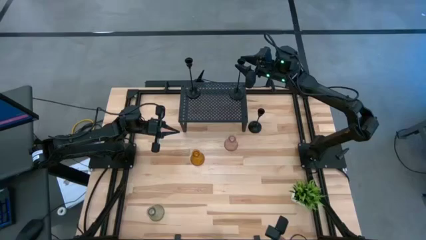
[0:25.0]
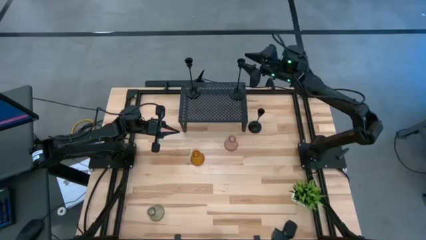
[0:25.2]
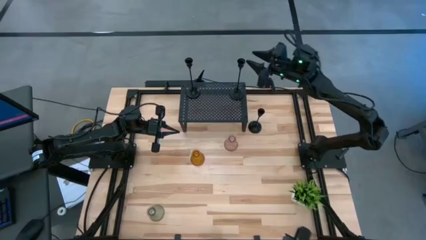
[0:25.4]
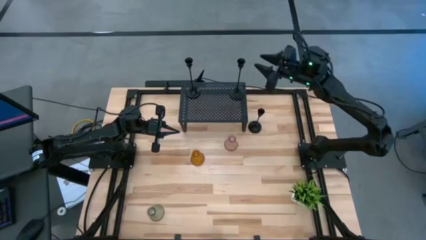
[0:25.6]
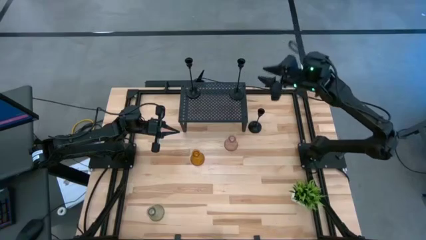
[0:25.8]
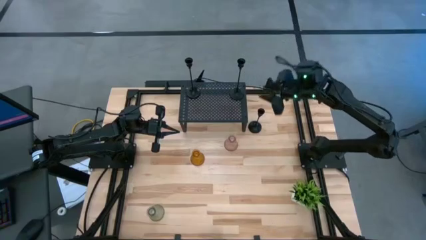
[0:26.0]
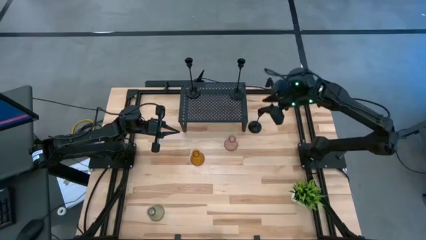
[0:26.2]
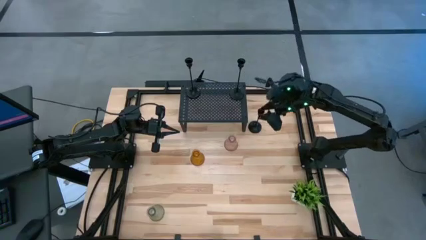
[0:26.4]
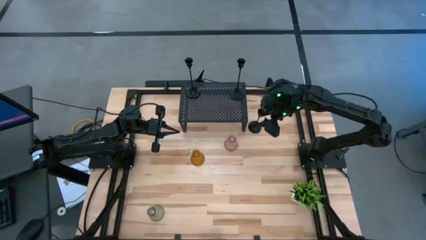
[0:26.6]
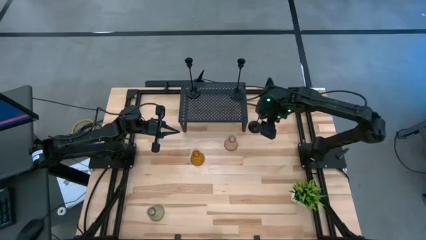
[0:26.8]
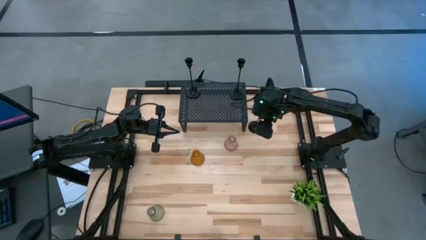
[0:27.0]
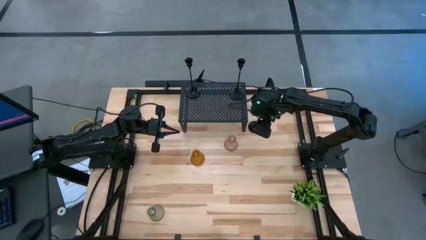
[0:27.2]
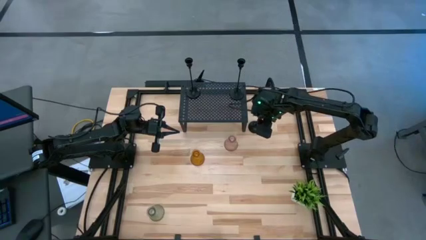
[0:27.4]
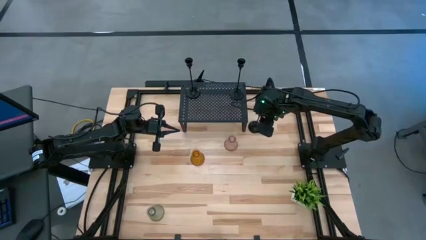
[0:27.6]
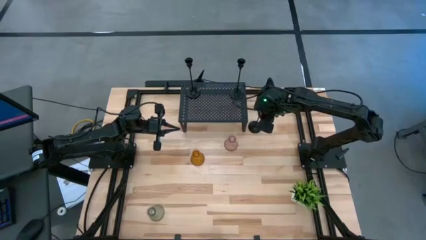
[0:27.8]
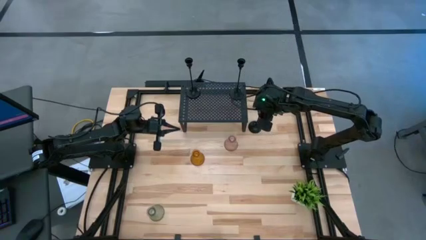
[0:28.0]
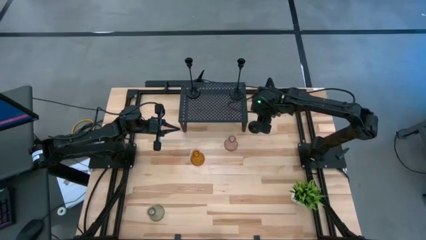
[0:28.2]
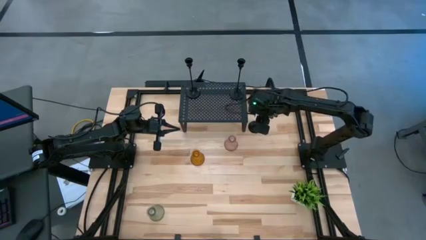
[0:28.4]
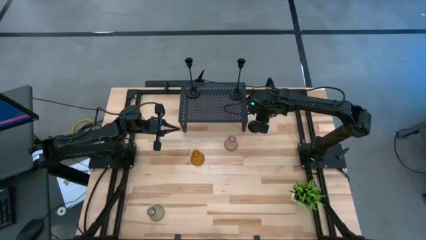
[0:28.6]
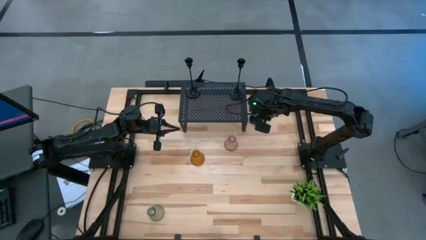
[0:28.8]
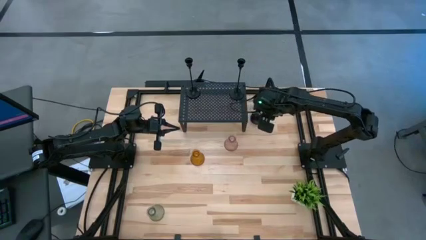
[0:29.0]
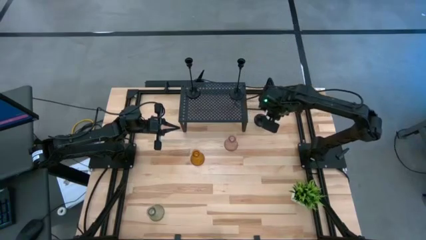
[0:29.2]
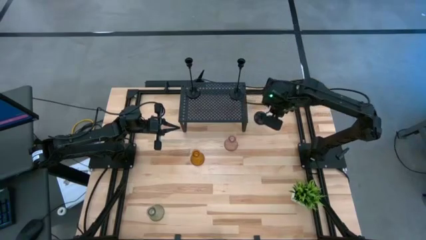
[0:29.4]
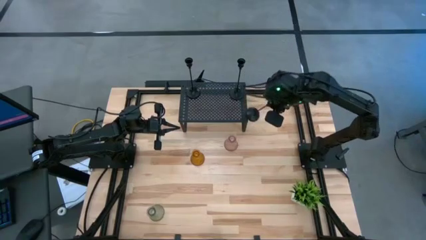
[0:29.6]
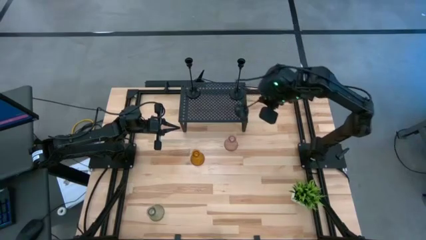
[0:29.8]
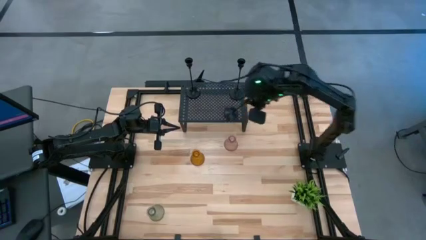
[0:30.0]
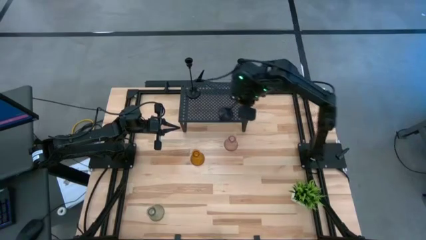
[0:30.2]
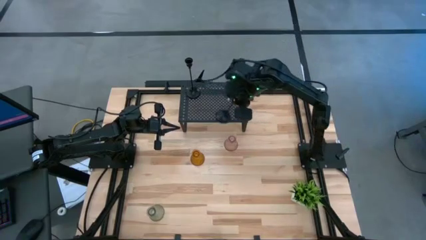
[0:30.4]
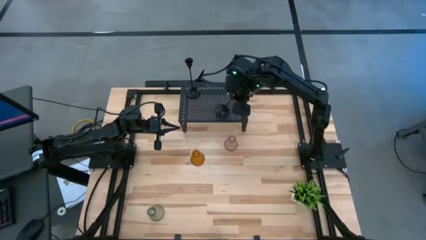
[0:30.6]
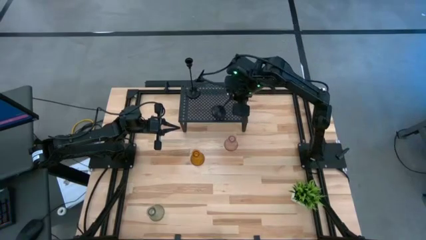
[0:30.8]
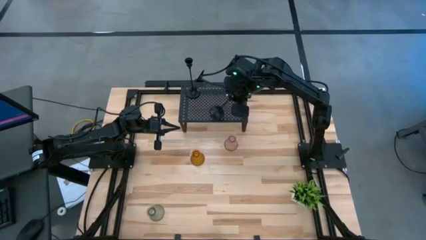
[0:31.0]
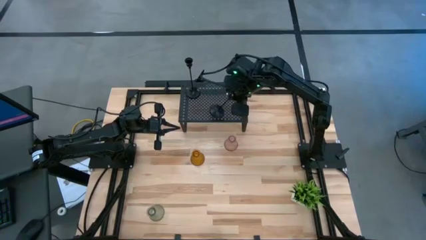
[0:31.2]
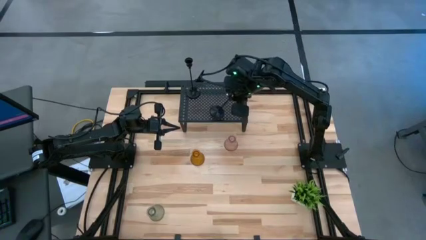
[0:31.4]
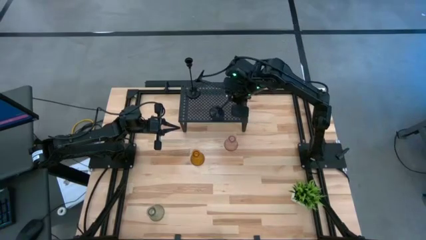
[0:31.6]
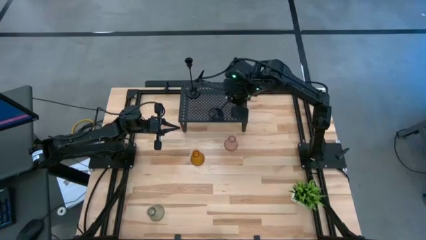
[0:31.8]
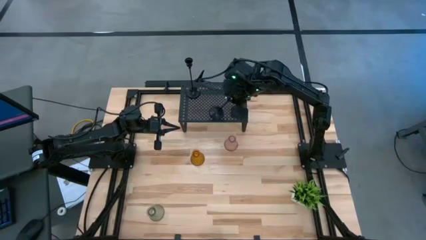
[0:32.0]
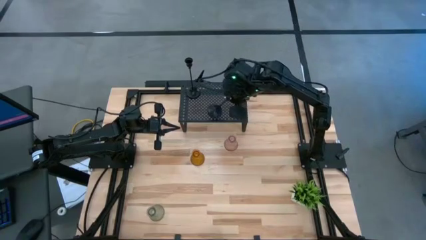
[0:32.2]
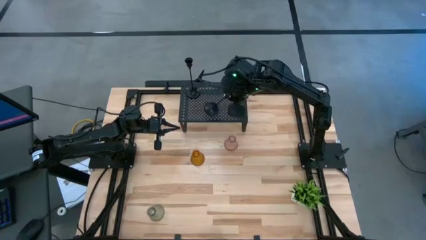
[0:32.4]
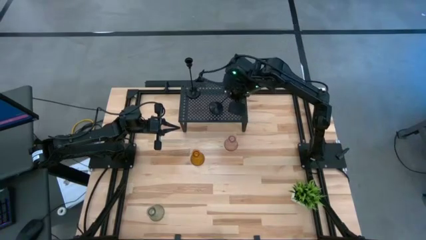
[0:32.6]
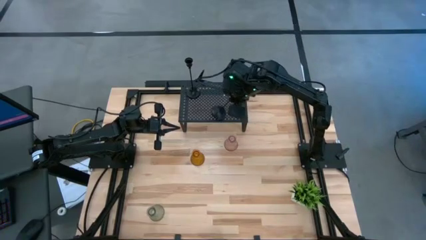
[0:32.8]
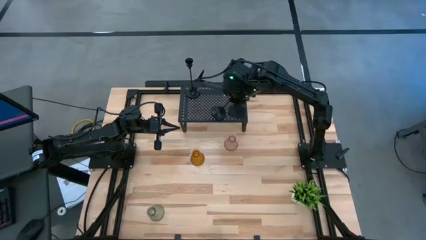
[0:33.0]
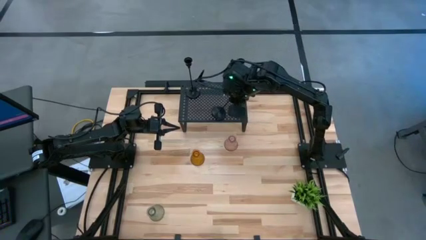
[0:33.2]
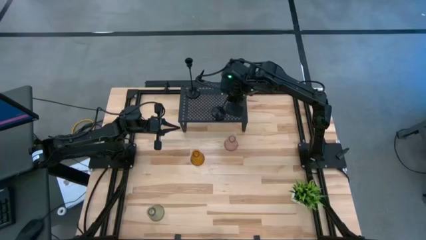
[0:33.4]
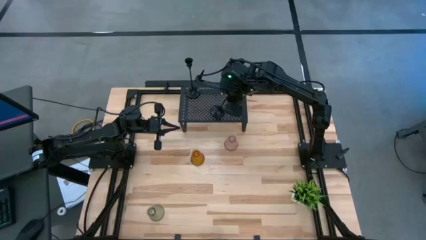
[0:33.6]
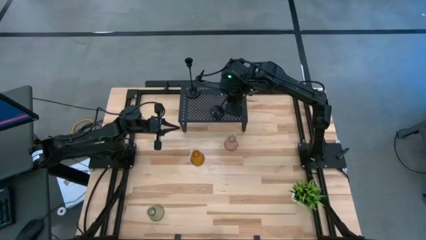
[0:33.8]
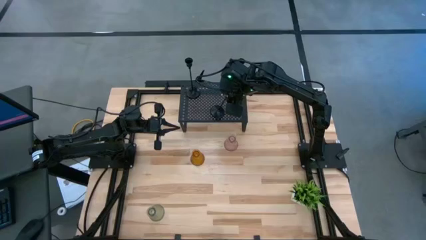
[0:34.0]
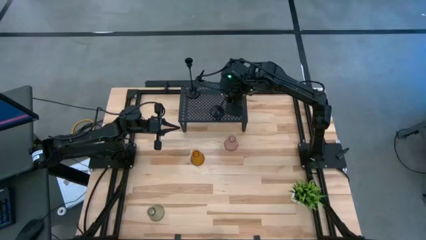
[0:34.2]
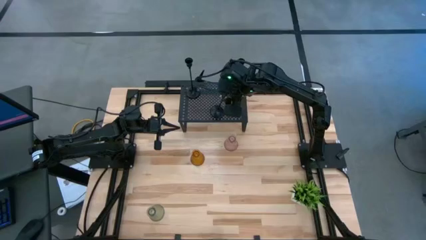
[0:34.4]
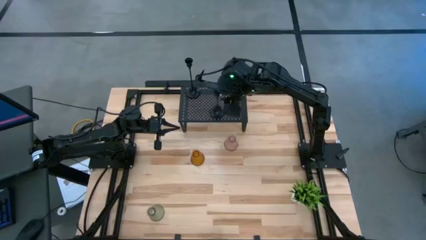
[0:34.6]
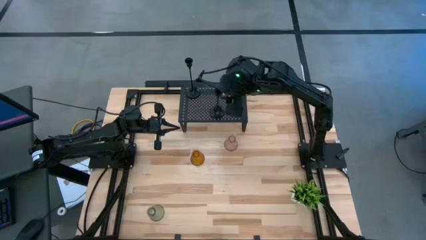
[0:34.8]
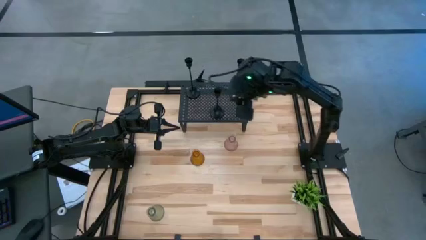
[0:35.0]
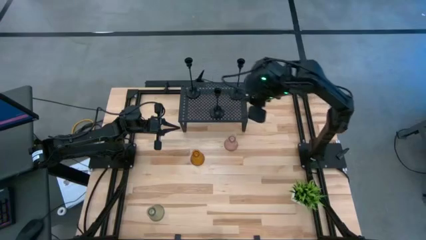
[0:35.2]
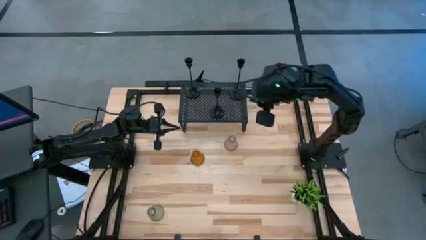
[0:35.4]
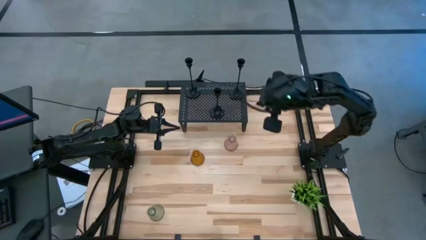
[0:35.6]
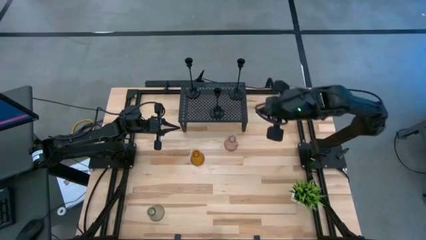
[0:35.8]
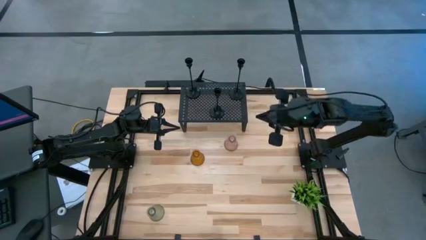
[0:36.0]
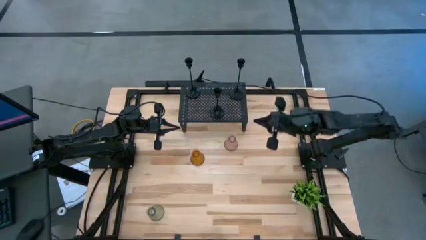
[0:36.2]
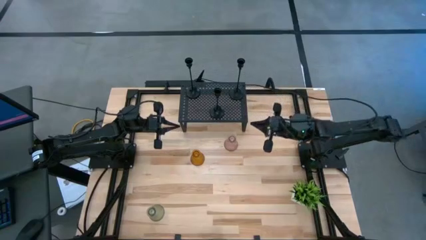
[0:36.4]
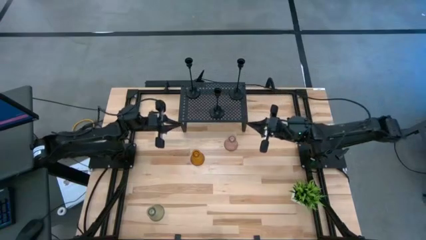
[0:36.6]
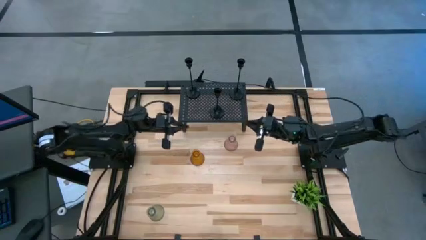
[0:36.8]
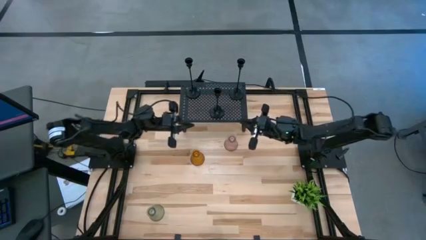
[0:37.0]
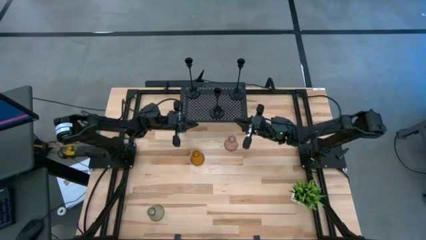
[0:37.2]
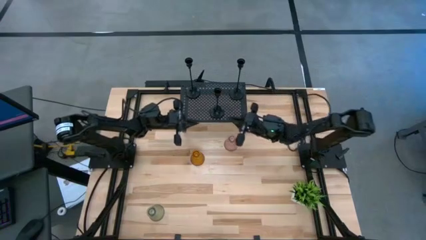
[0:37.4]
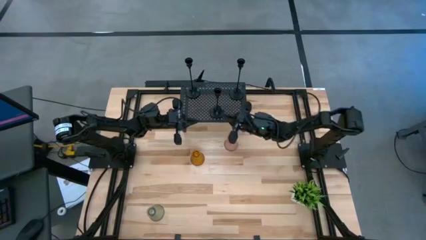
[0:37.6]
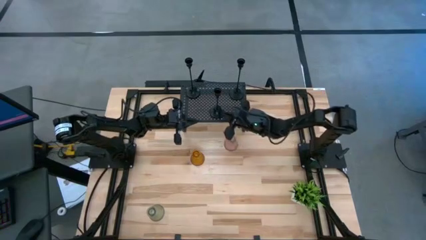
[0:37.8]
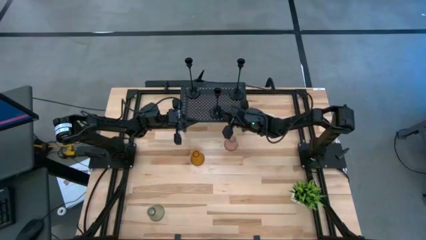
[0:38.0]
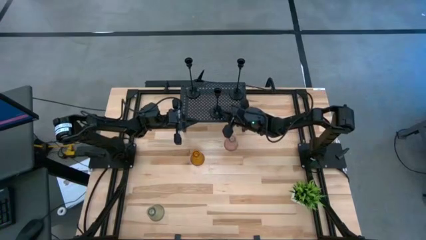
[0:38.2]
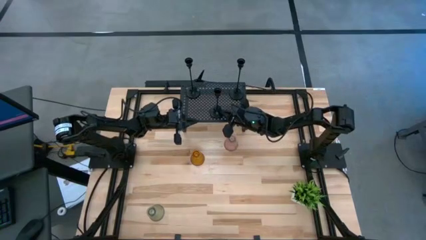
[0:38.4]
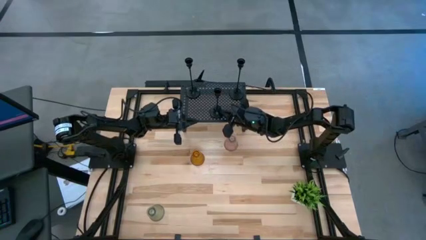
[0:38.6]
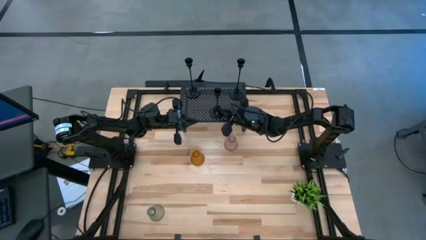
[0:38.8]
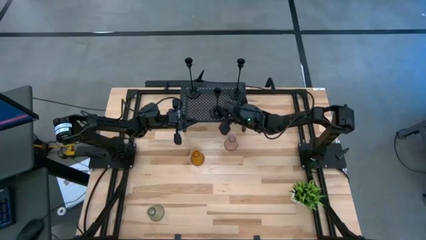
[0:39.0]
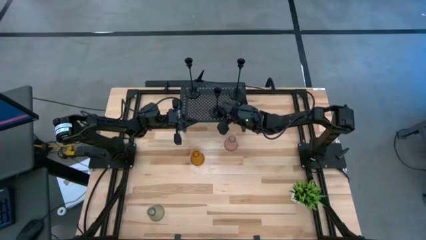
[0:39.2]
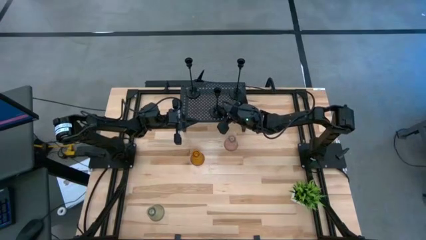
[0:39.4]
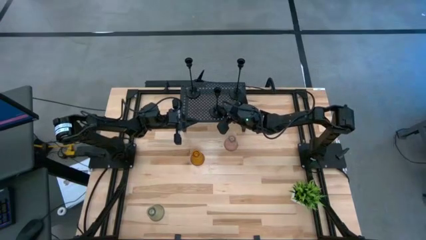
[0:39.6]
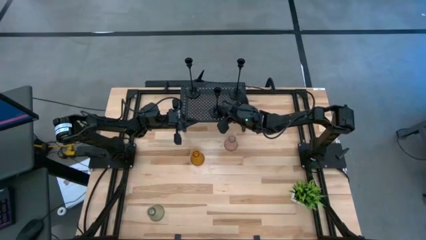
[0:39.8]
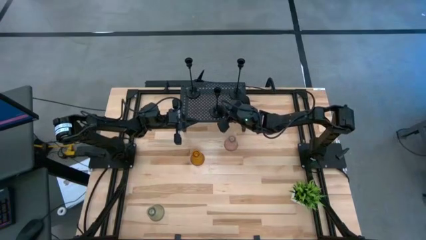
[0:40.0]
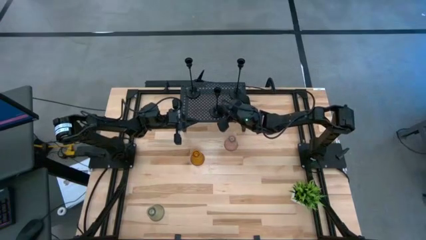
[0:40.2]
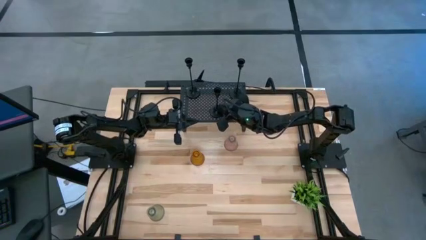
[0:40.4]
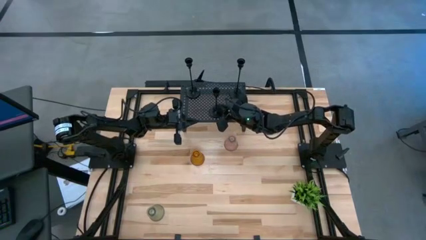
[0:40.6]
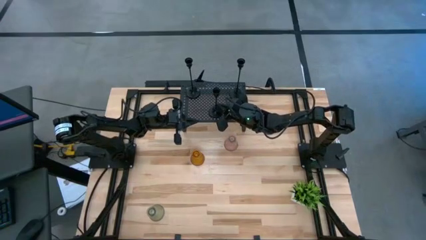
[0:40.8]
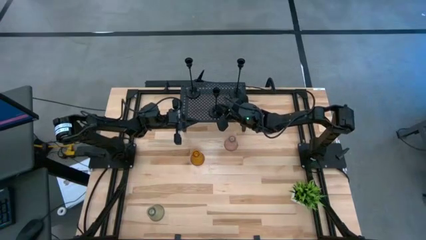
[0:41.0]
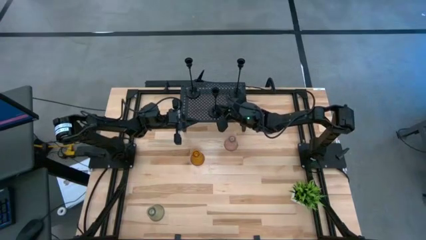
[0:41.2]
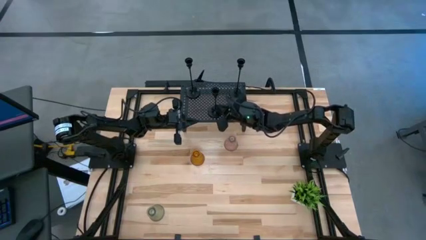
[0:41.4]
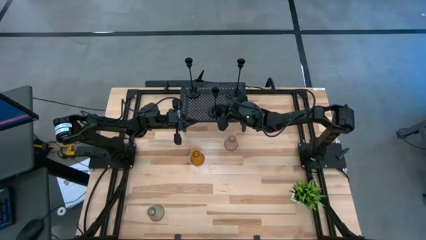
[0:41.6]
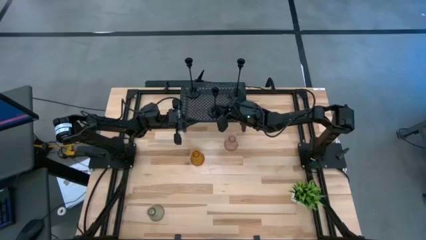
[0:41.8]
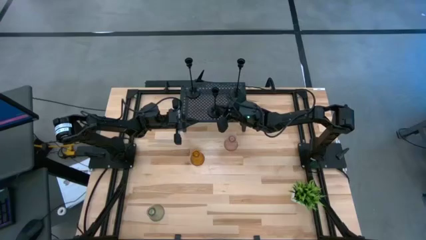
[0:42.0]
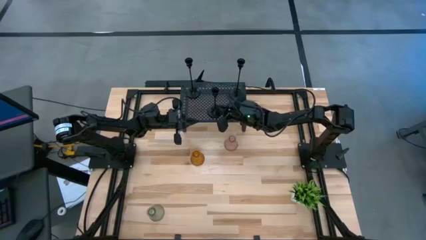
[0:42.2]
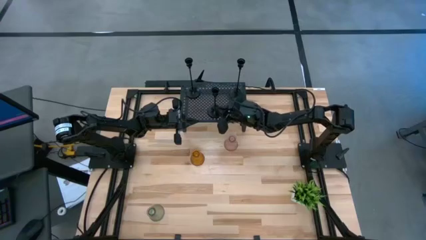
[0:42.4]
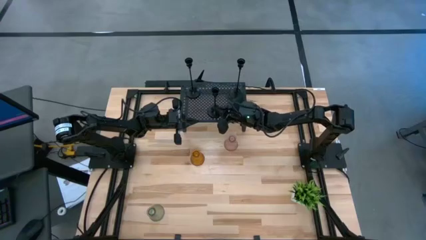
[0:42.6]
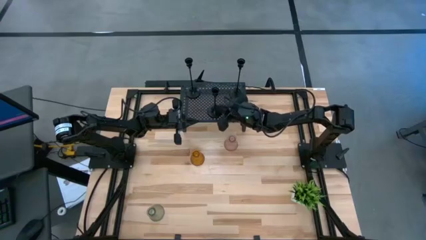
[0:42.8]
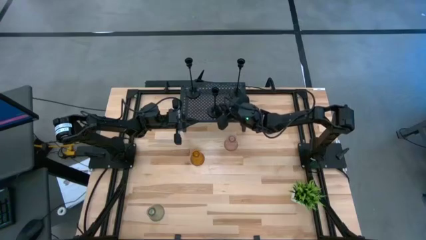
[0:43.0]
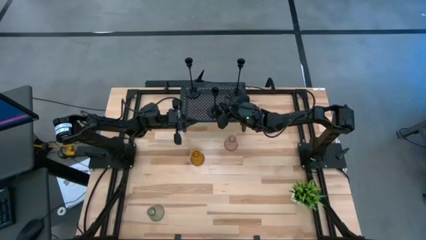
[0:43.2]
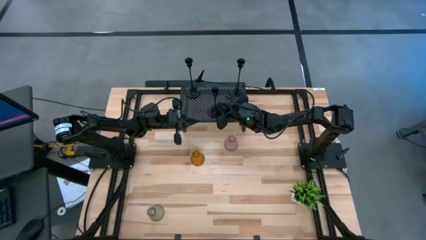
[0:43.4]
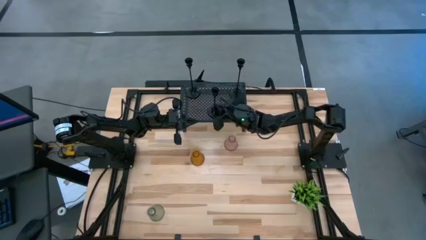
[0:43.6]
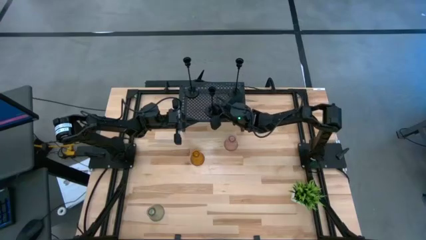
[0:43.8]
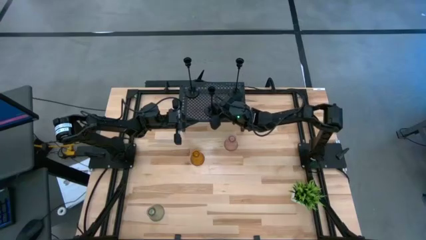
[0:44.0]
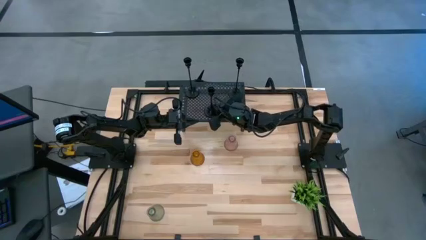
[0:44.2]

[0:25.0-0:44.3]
Task: Pick & Place candle stick holders
Put the black candle holder on the shelf
